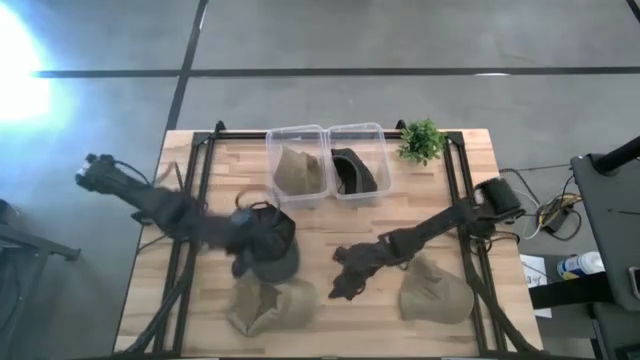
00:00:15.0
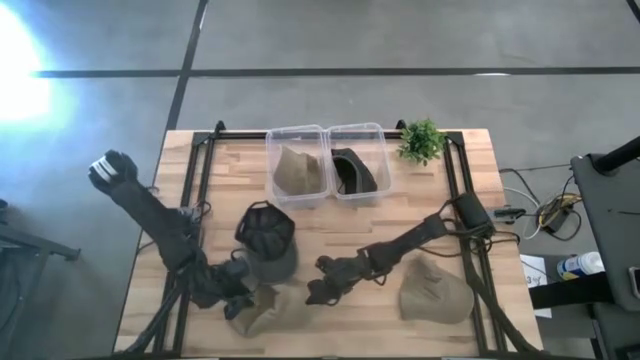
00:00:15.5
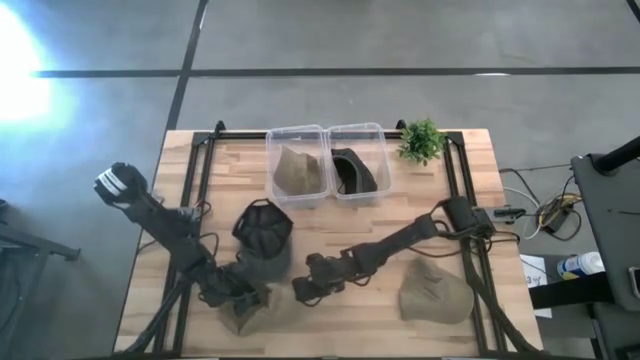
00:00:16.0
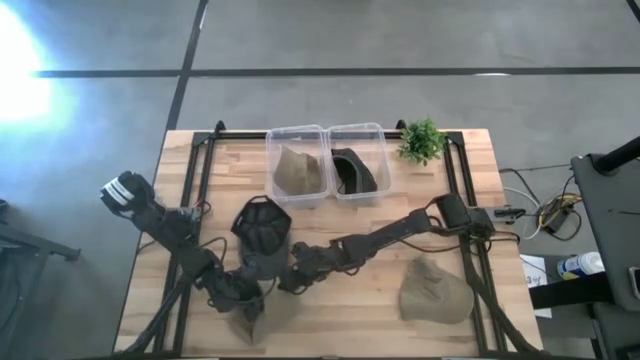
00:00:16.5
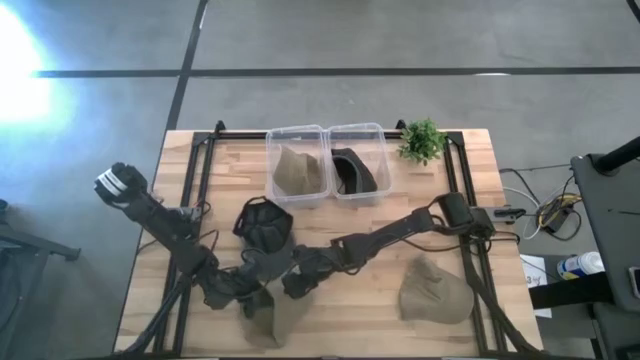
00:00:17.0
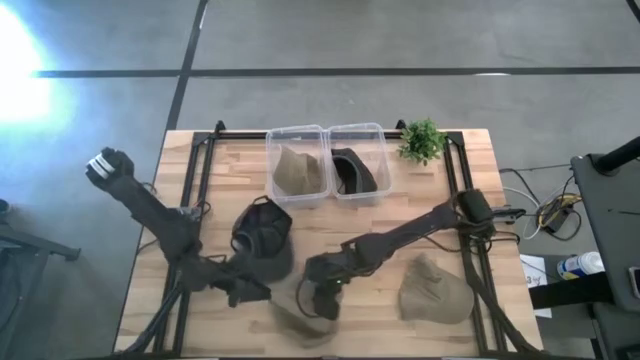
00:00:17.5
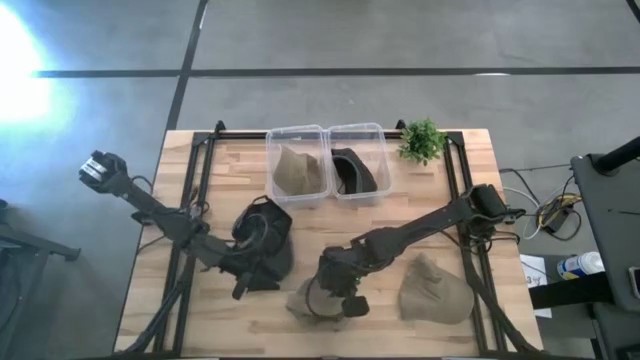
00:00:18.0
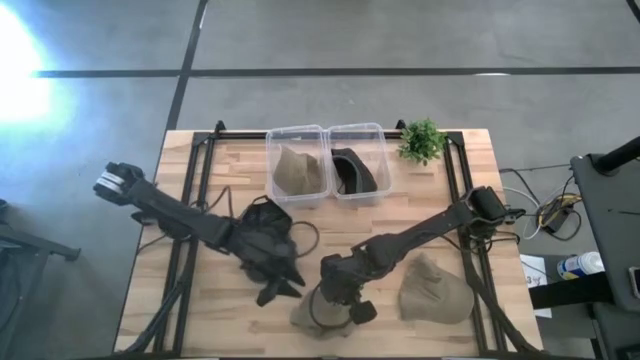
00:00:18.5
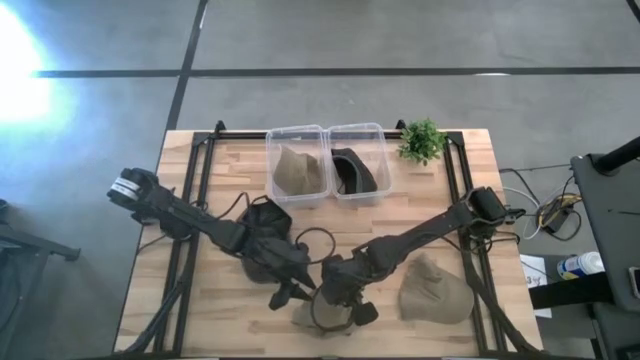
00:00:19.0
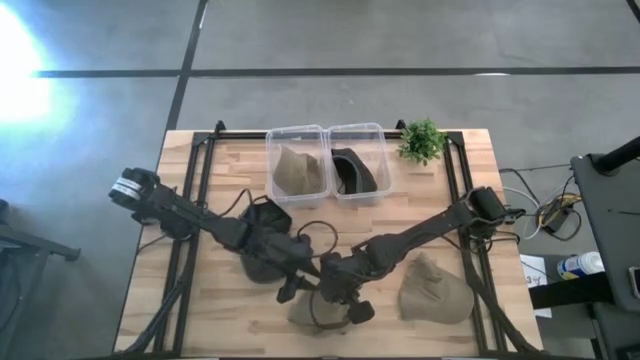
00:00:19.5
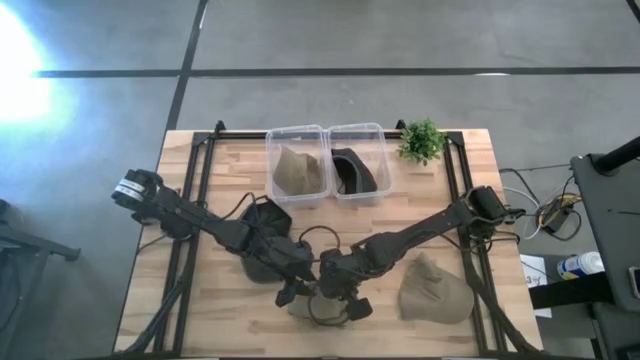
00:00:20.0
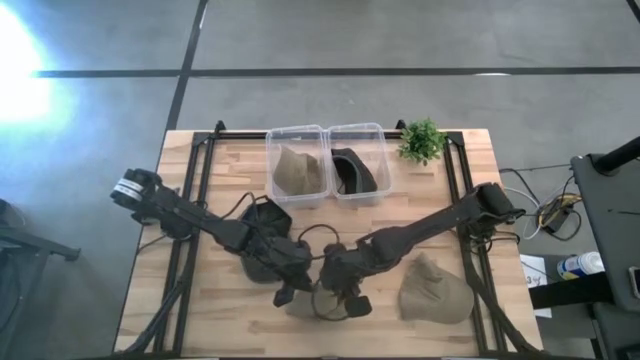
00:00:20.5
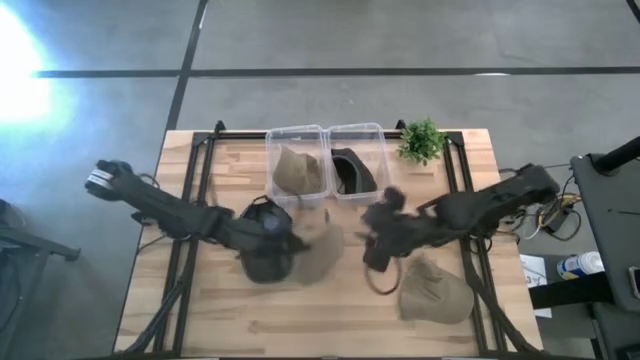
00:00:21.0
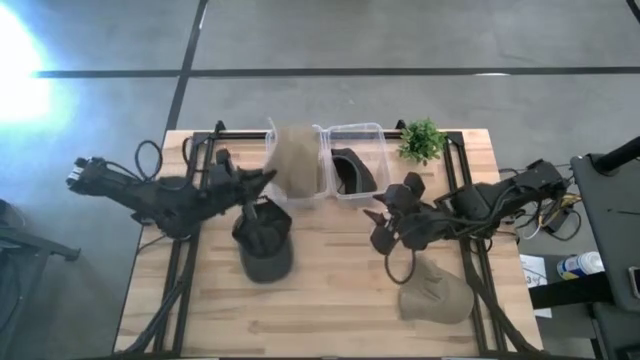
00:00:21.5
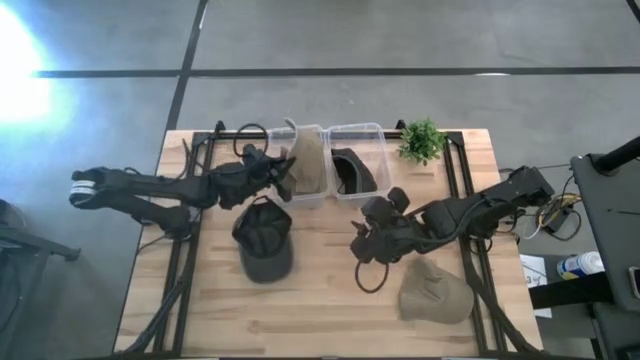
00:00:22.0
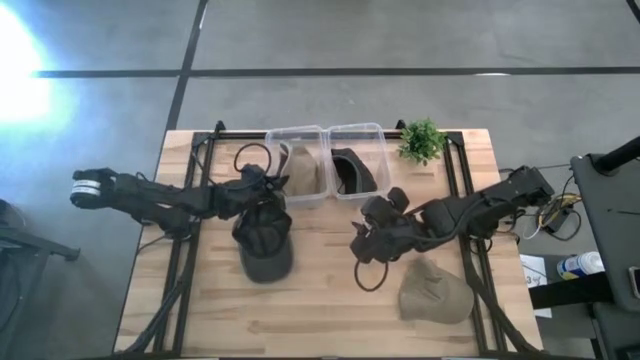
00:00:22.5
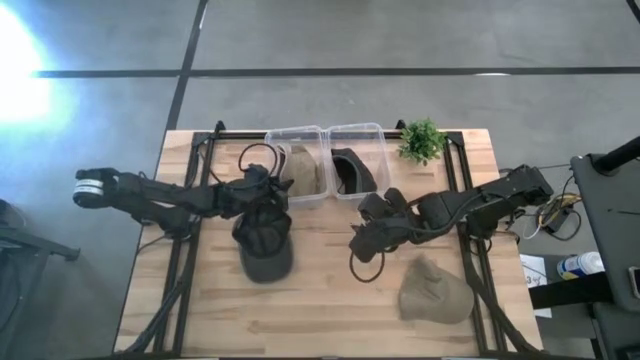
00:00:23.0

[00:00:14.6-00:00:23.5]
Task: Pick & Place hat
Put the left brown cap into the left transparent bin

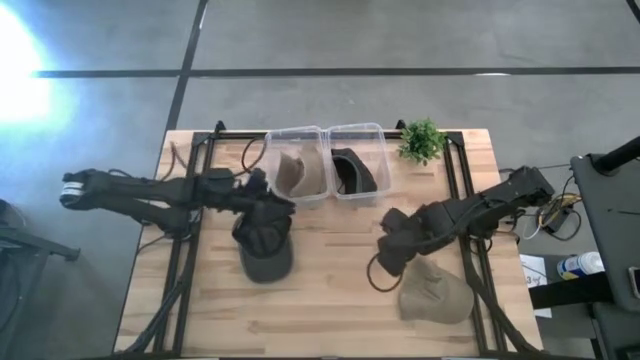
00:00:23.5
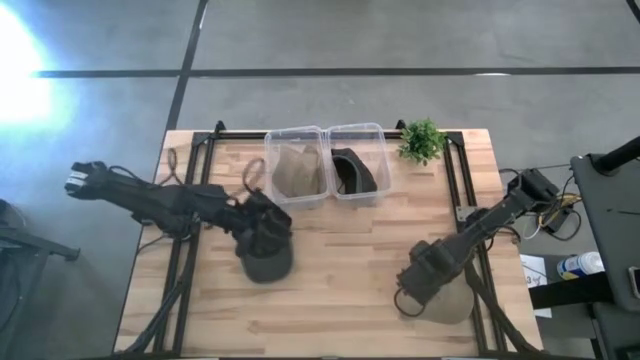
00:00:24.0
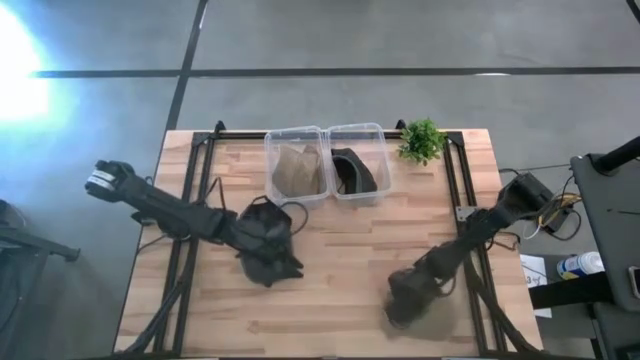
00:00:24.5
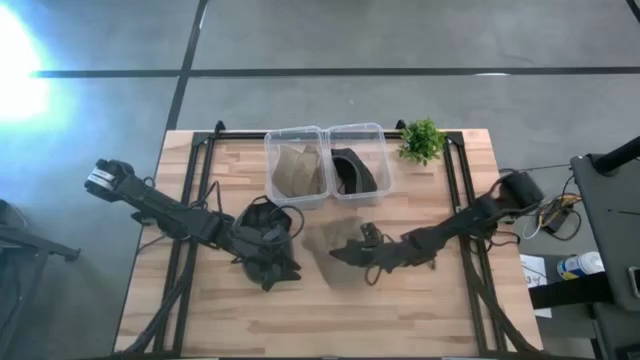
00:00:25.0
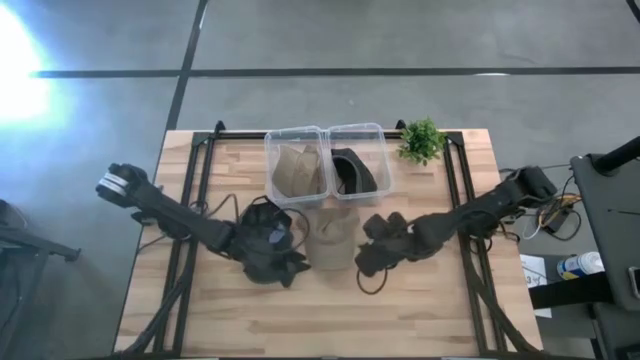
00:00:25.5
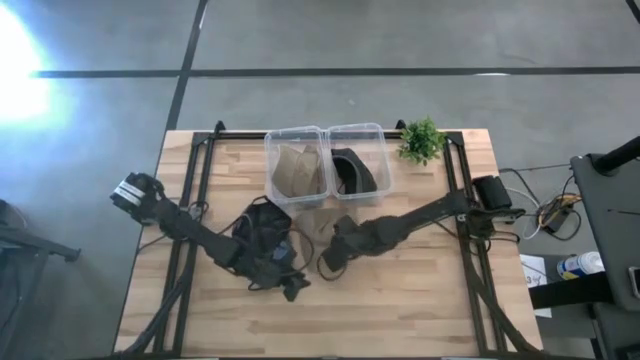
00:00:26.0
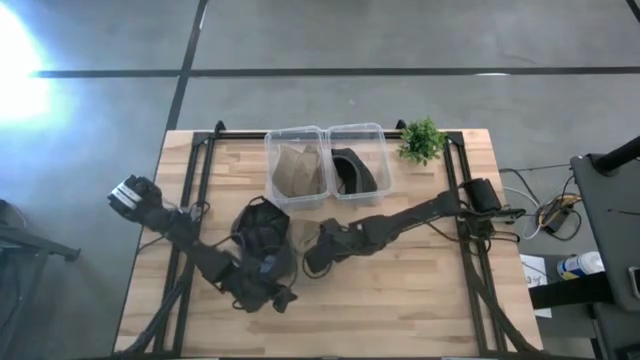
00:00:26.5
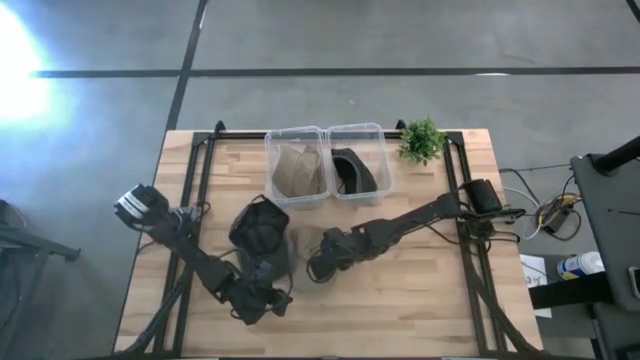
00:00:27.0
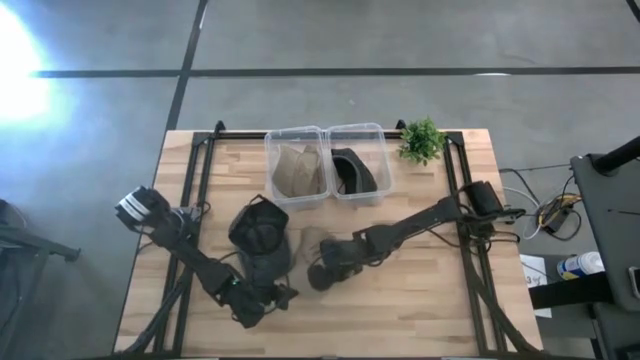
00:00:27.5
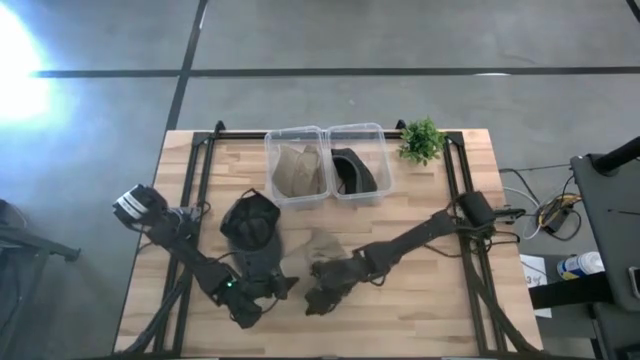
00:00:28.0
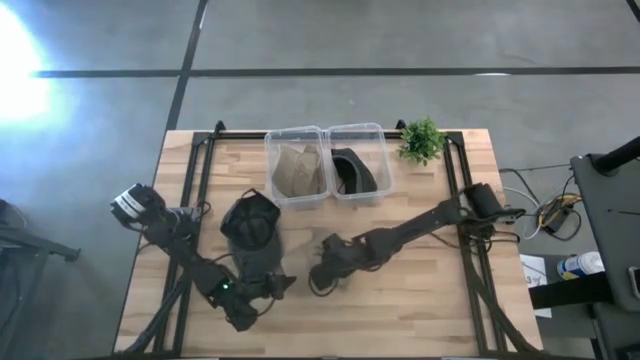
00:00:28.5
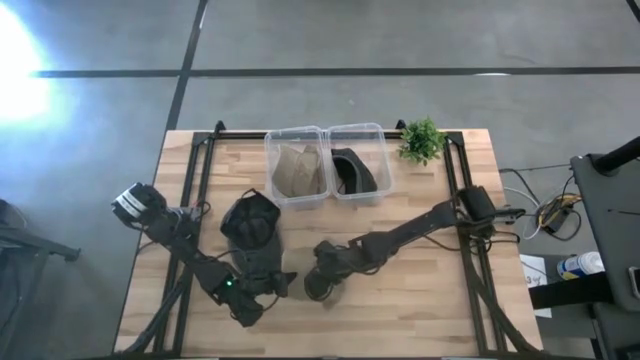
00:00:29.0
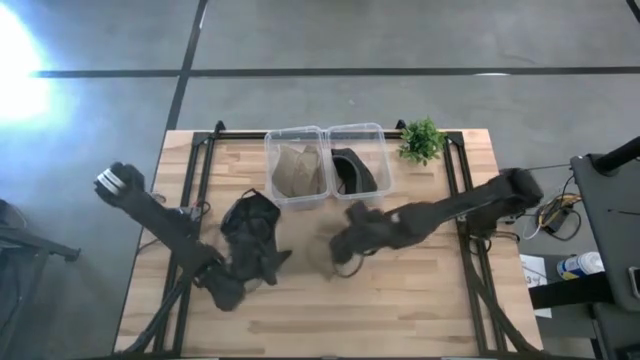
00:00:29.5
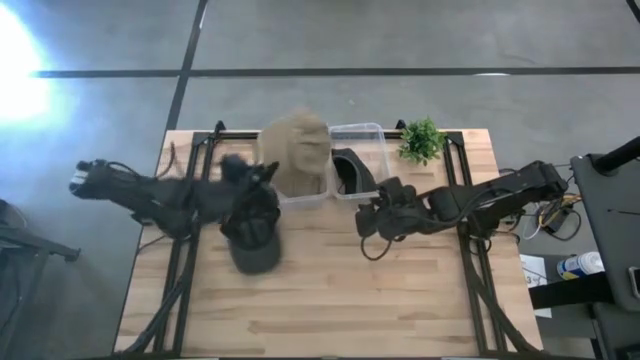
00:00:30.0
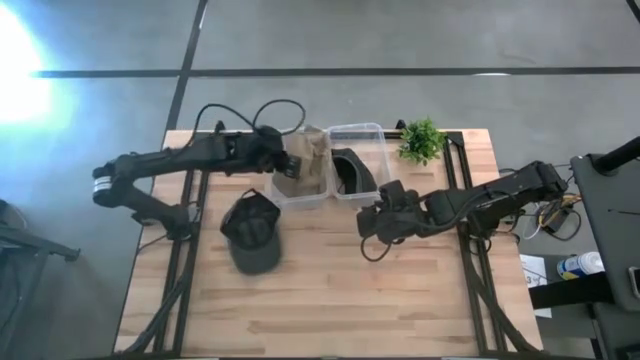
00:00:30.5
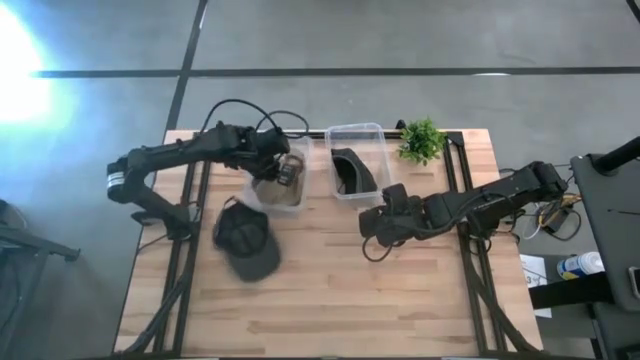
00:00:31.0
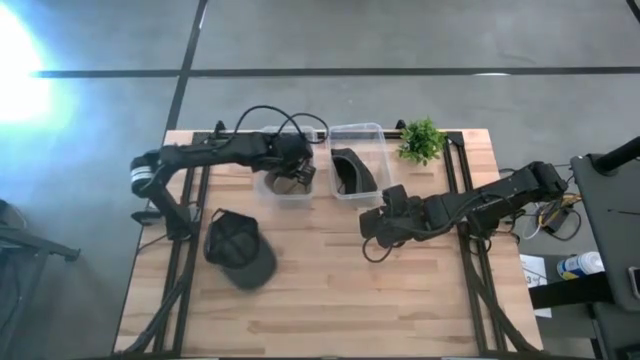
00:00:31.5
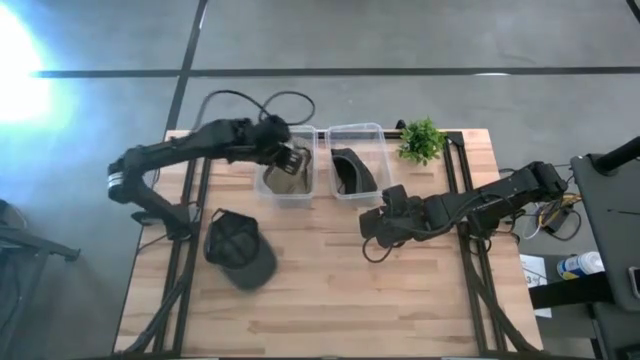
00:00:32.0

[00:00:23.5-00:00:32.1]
Put the brown cap into the left transparent bin

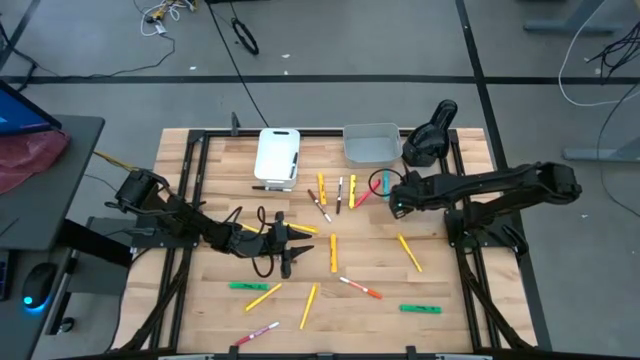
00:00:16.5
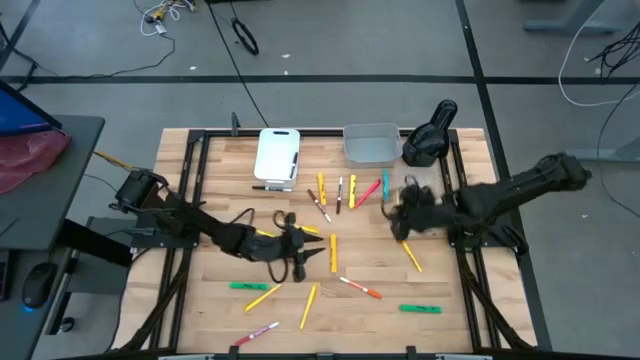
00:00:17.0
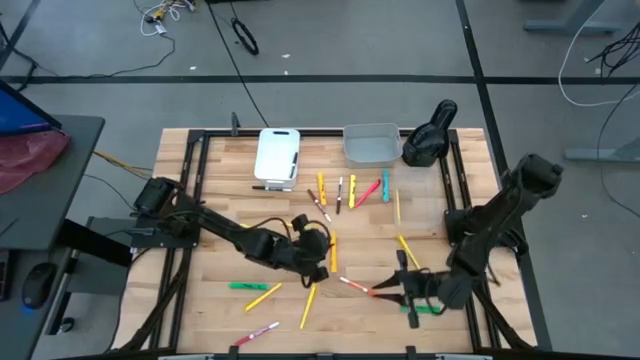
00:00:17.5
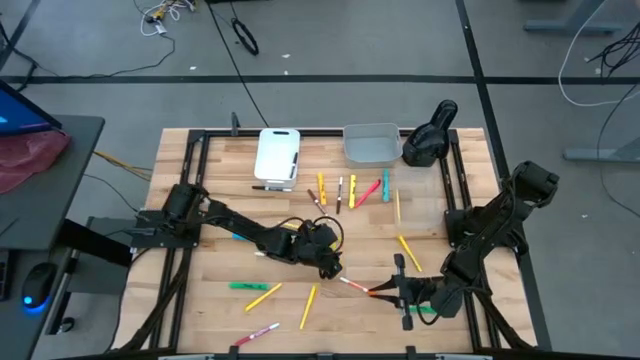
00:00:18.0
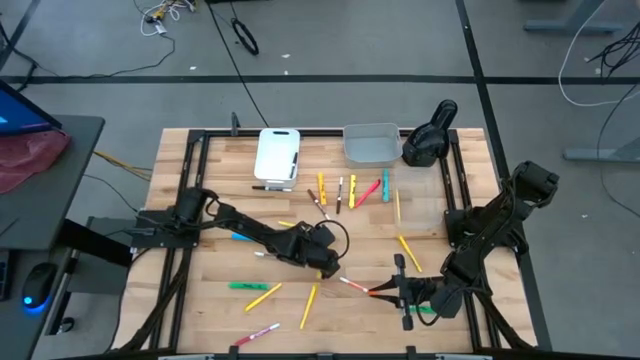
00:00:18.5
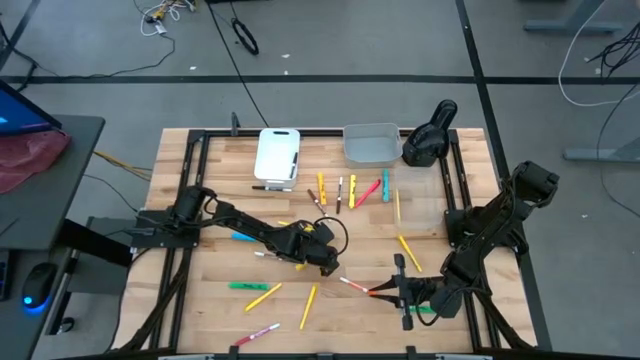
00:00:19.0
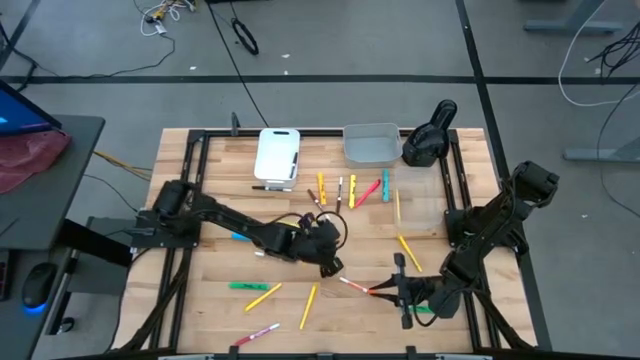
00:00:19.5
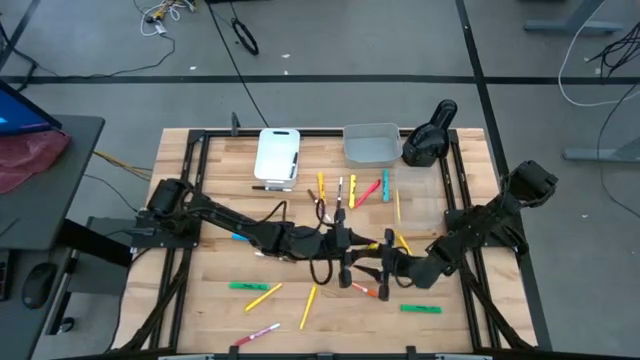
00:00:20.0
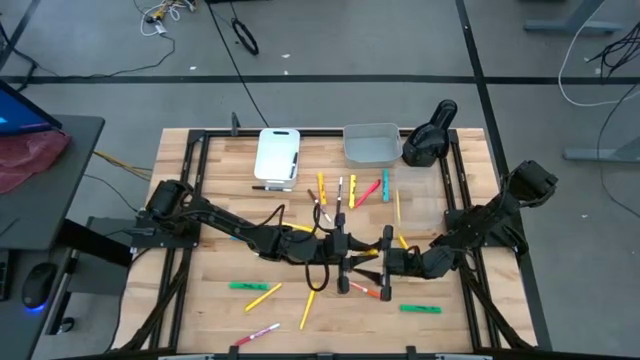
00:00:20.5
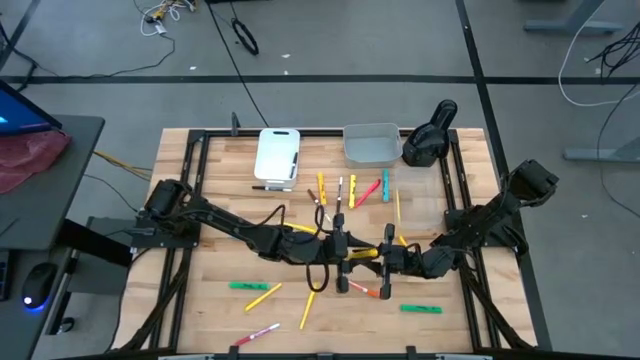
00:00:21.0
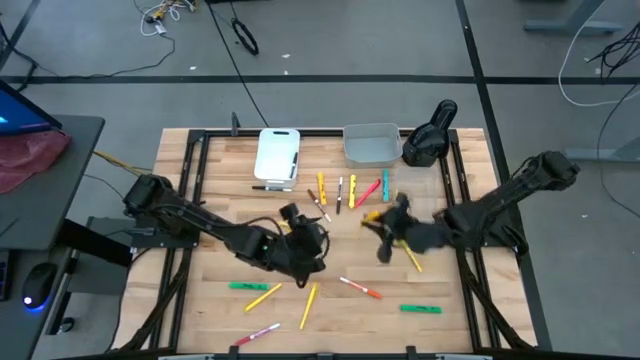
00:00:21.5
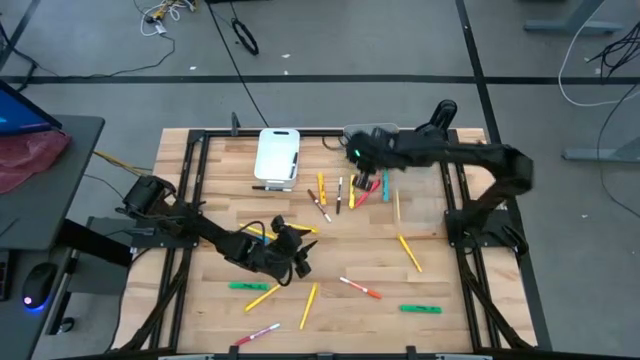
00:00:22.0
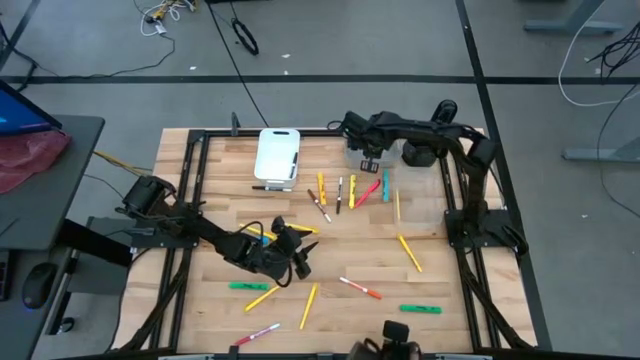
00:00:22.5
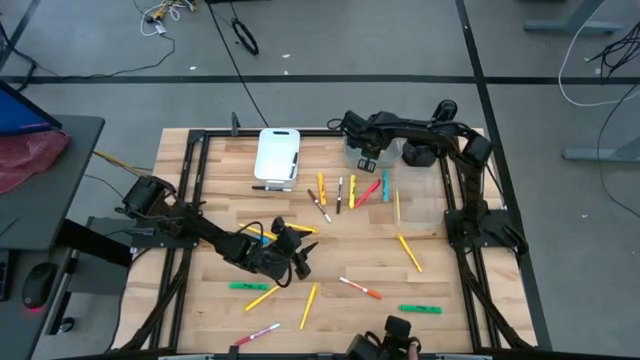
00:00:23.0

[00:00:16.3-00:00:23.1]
Task: Pick & Place Markers
Put the yellow highlighter pen into the gray bin
